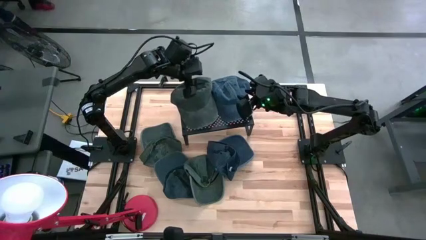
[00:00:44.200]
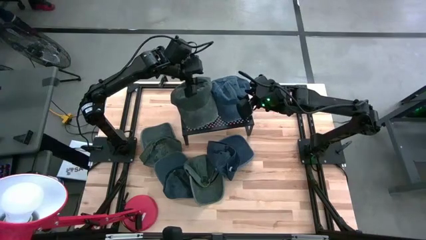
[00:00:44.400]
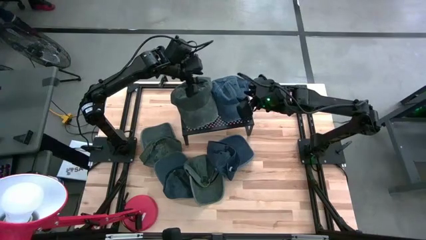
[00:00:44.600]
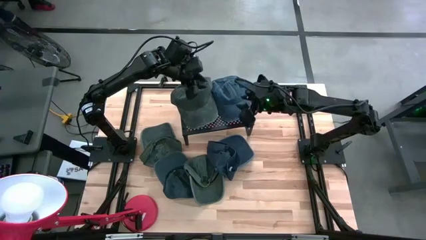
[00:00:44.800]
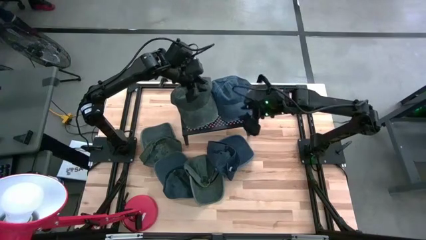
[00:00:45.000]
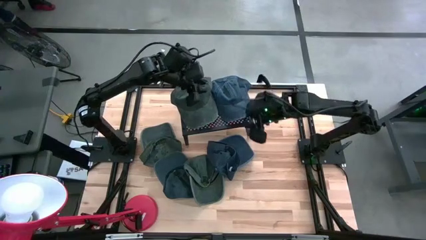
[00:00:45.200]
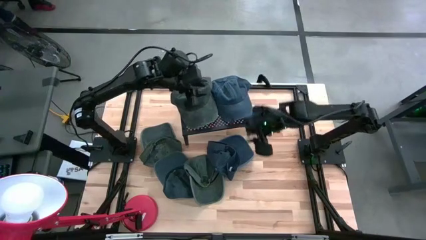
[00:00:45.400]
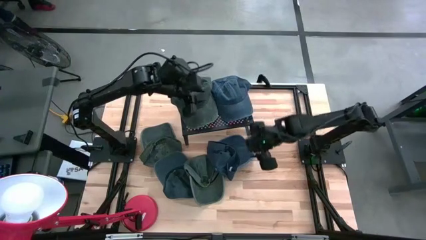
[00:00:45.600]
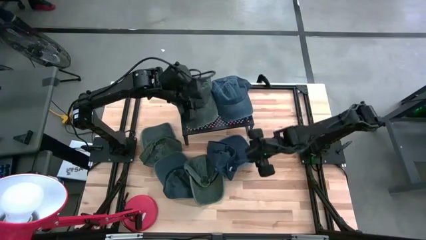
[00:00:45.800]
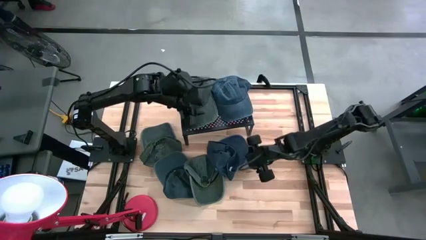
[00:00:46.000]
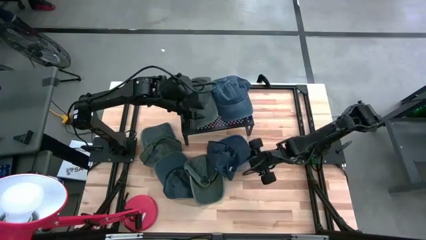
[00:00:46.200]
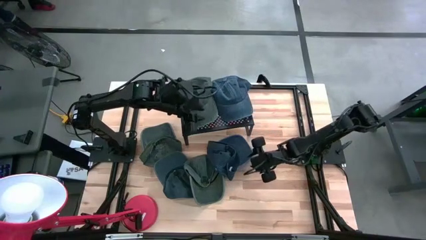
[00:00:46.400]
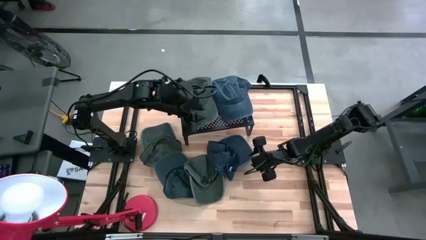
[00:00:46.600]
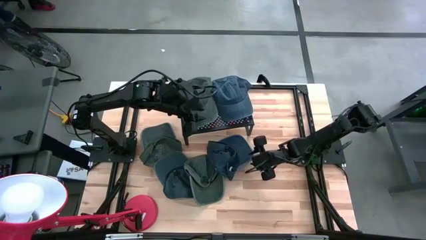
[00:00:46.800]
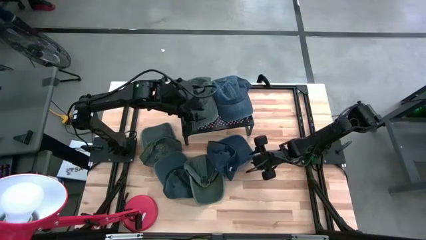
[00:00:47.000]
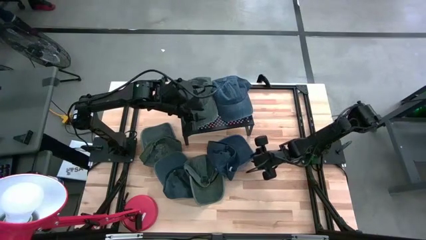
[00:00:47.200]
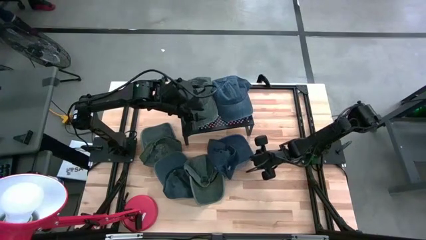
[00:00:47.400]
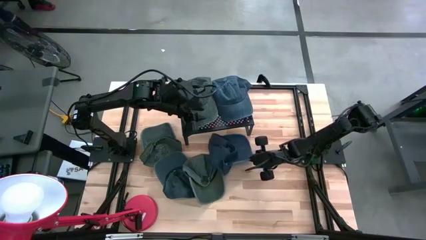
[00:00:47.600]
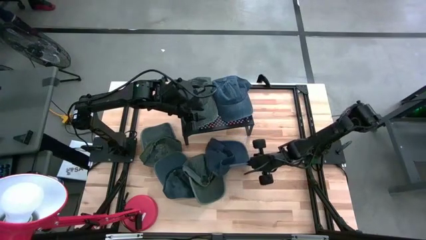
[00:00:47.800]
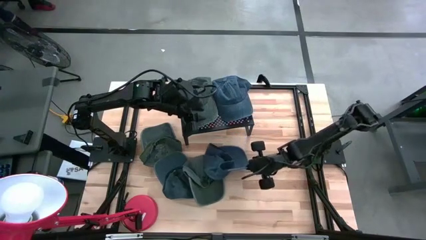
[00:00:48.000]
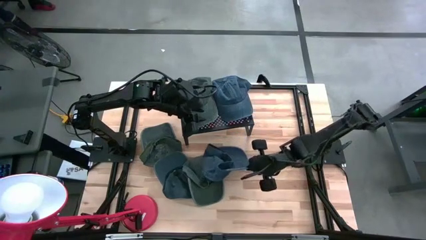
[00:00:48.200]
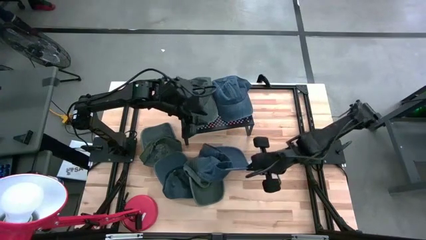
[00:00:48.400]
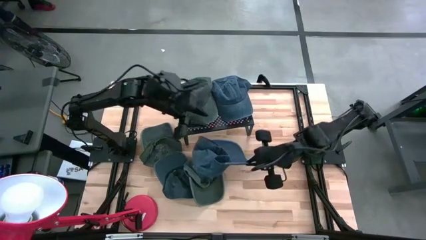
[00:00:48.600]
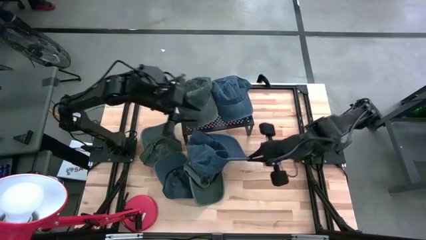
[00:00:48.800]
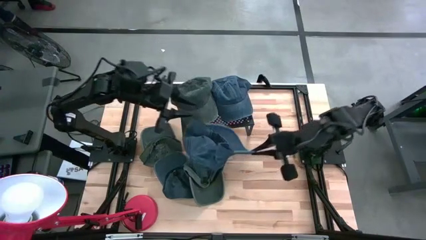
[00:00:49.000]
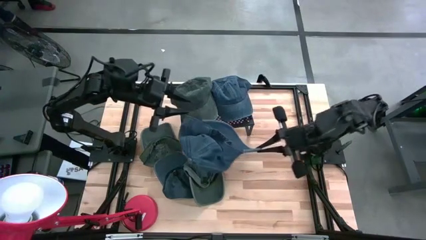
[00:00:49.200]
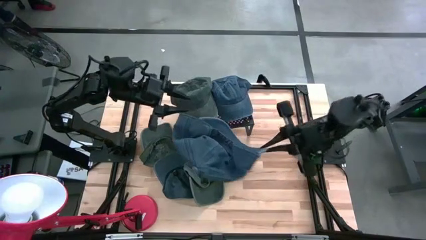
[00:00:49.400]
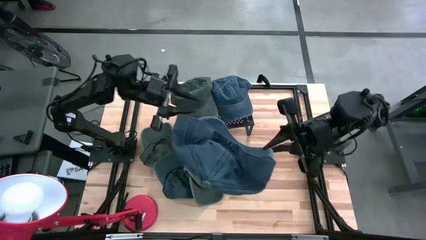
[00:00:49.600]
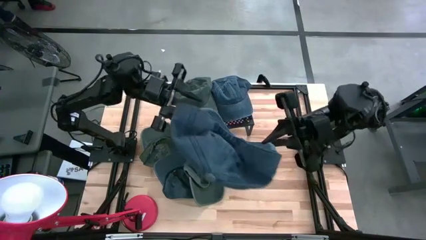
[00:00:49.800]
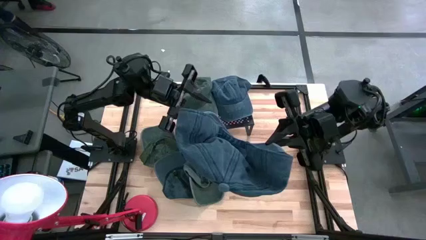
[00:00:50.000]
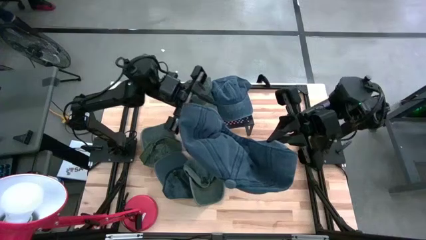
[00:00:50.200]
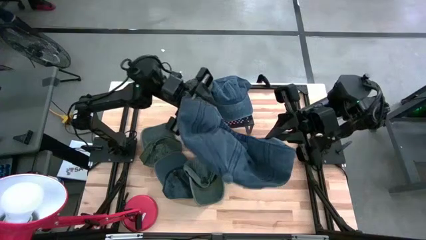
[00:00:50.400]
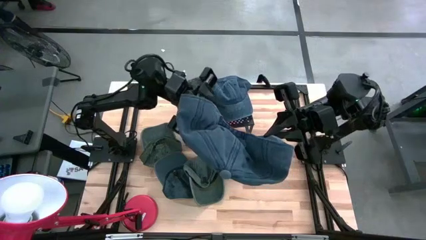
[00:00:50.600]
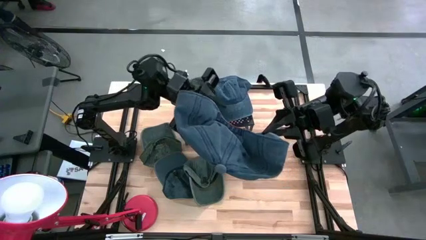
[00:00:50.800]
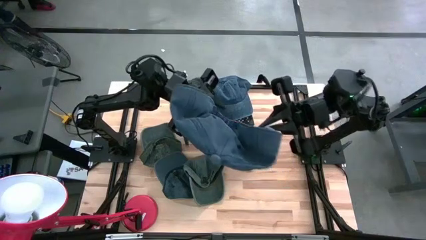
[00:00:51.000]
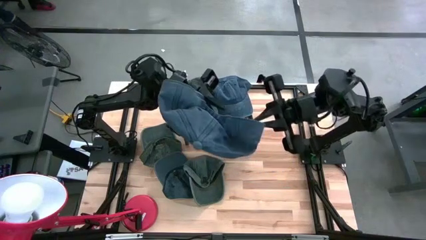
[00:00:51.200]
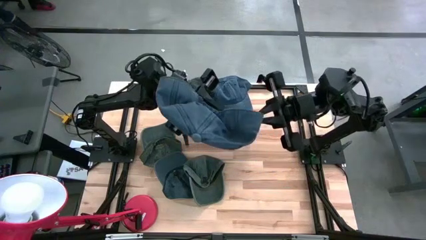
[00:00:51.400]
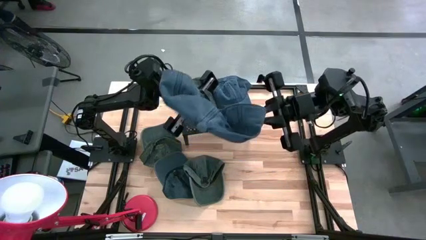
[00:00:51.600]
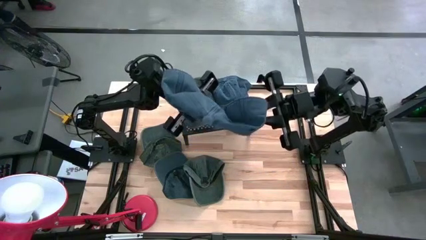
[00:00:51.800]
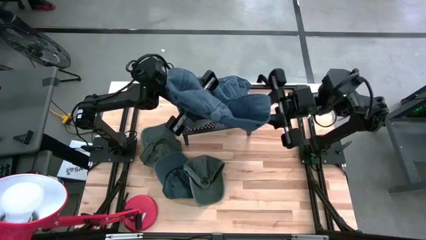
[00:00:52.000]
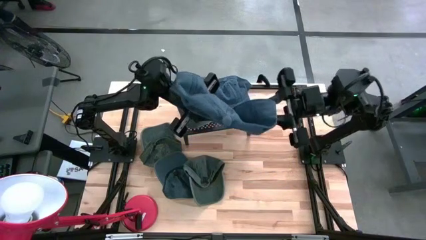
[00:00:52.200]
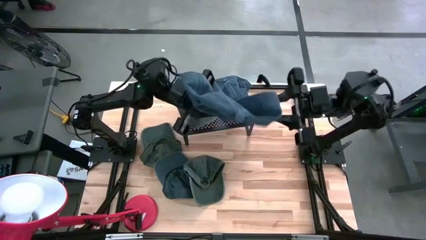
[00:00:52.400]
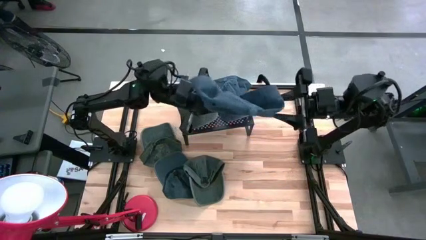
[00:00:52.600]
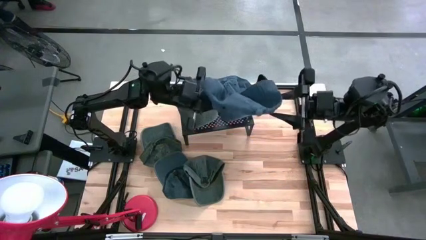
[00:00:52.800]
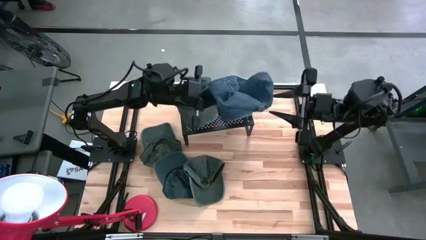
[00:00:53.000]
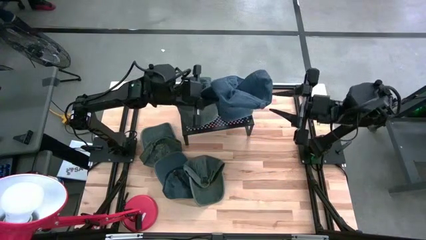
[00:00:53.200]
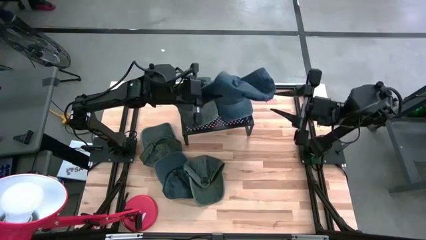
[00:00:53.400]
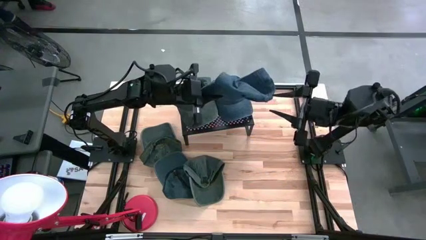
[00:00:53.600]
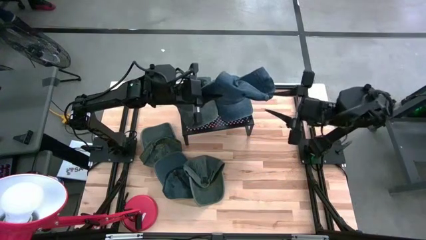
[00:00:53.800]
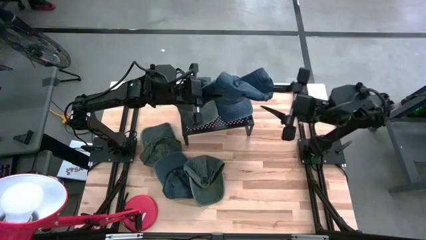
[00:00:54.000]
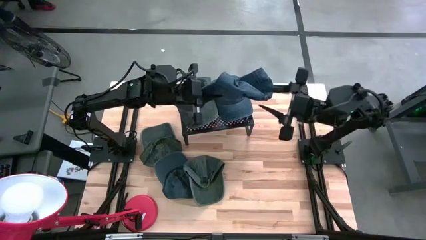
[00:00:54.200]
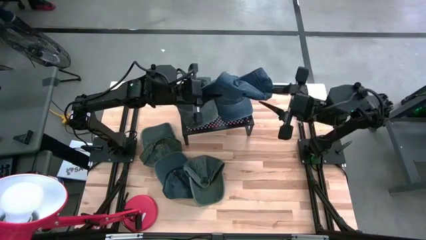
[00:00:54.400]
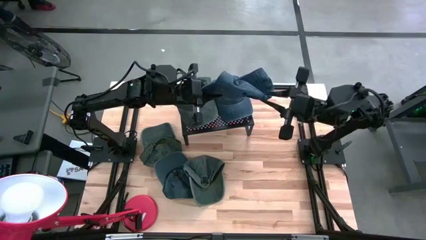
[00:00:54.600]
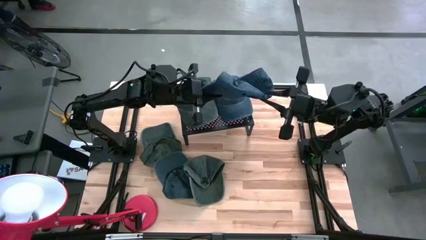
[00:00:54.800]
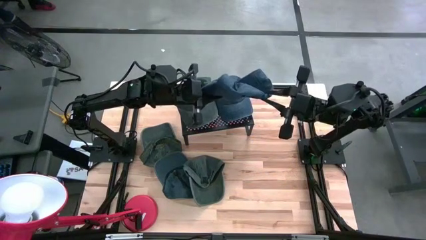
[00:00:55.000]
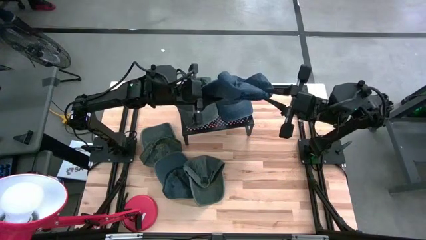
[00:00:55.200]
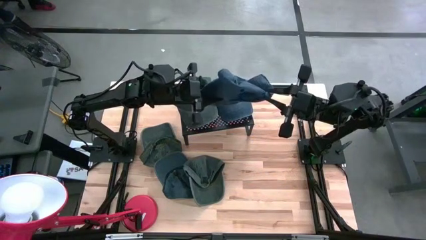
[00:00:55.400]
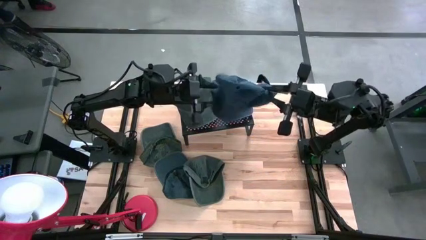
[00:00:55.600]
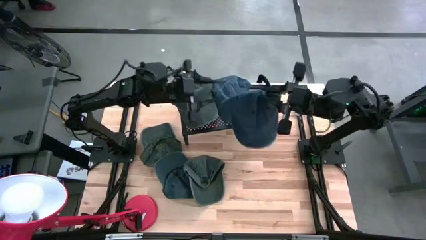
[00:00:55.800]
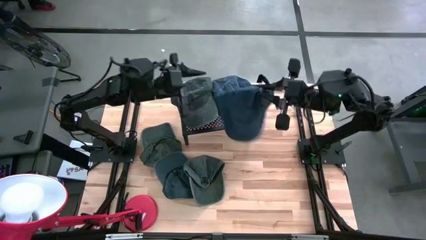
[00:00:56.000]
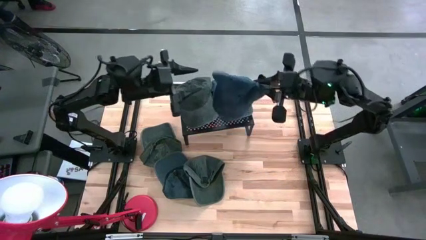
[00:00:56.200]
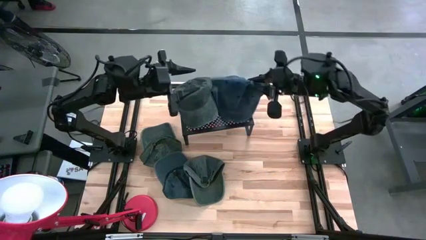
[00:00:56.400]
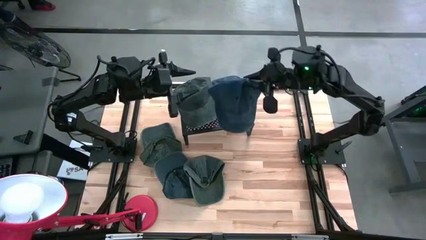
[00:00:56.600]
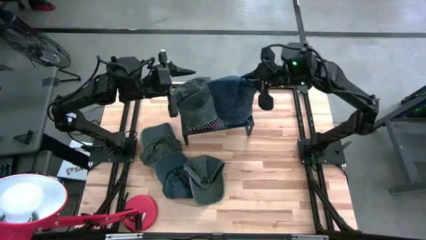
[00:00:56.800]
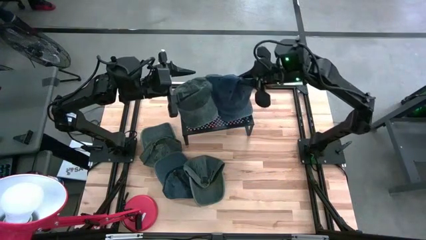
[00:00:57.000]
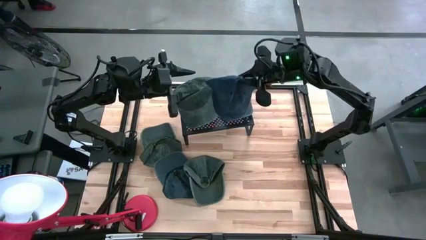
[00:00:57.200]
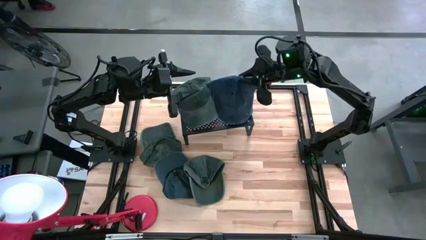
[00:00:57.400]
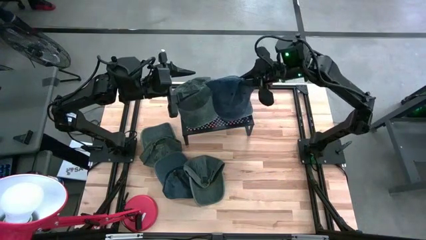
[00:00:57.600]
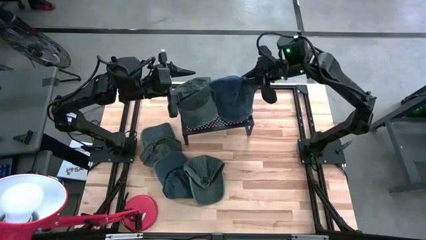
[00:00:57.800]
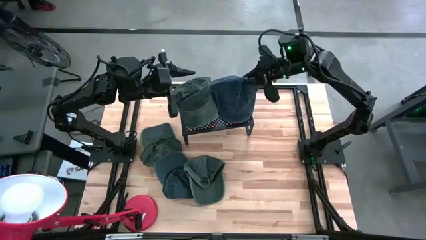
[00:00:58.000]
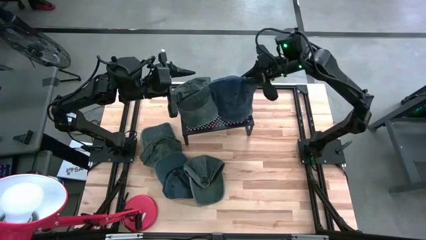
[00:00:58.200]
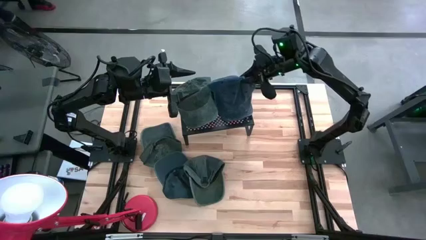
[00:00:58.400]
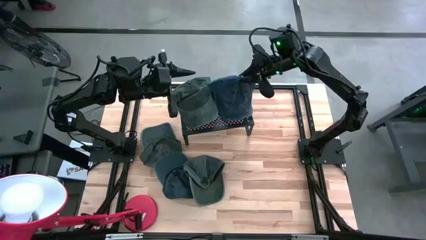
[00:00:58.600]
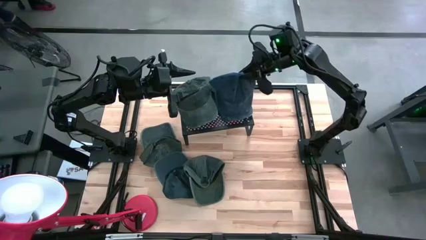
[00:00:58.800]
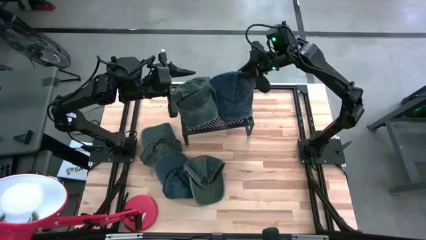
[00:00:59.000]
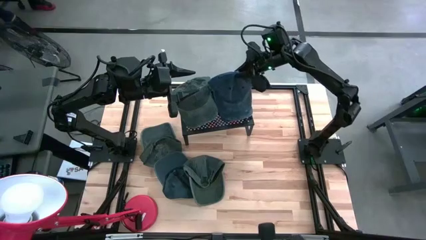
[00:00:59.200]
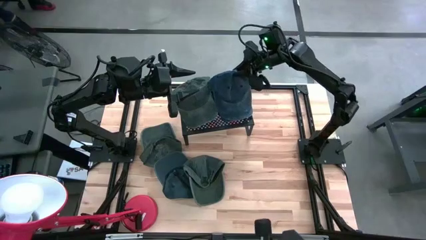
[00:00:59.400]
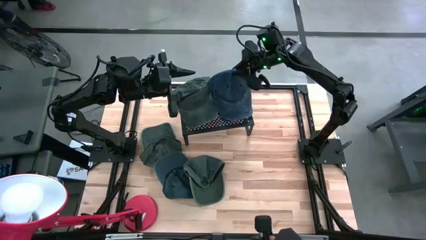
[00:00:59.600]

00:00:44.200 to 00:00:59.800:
Task: Pick & Place hat
Stack the dark blue cap on top of the dark blue cap on the shelf
